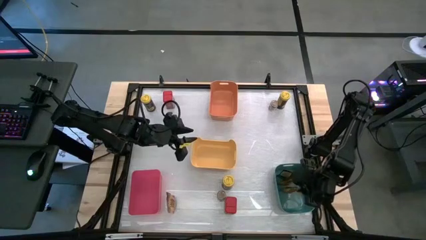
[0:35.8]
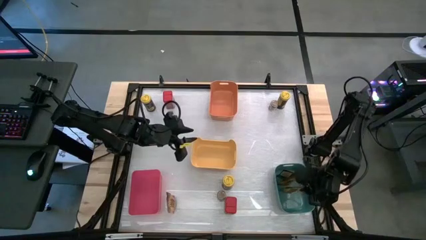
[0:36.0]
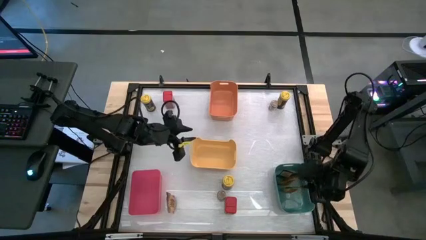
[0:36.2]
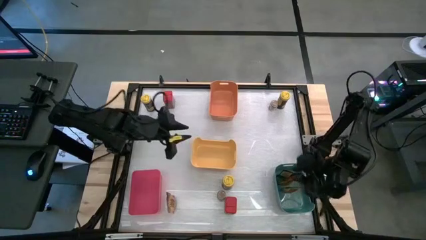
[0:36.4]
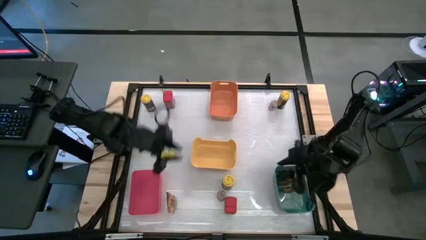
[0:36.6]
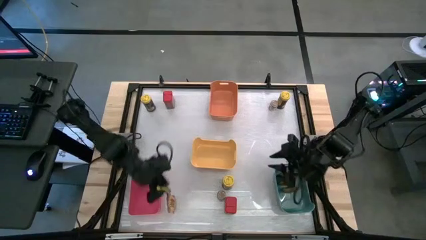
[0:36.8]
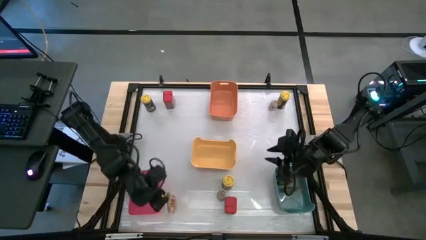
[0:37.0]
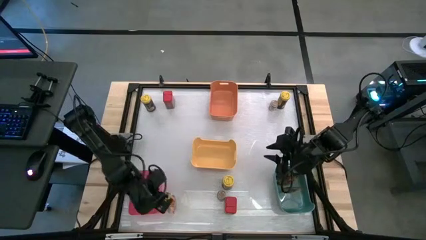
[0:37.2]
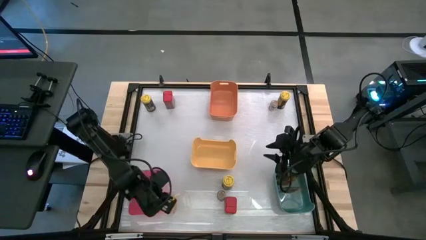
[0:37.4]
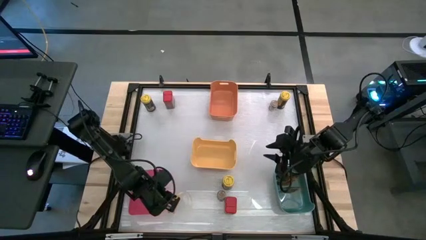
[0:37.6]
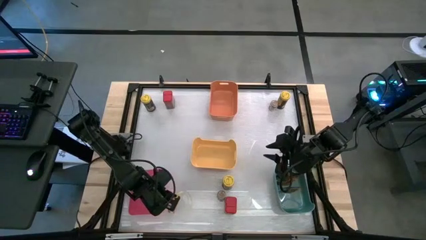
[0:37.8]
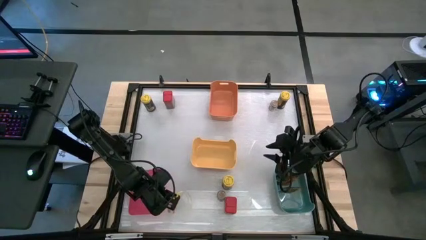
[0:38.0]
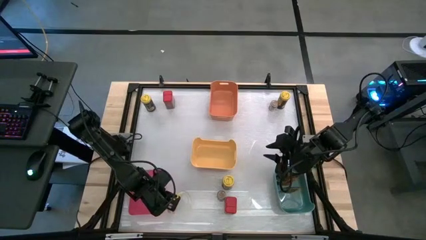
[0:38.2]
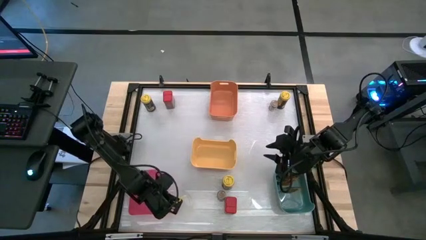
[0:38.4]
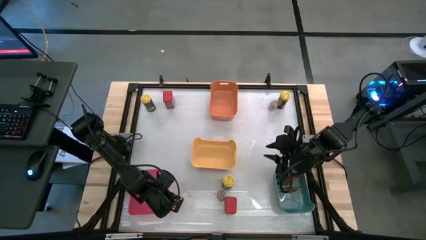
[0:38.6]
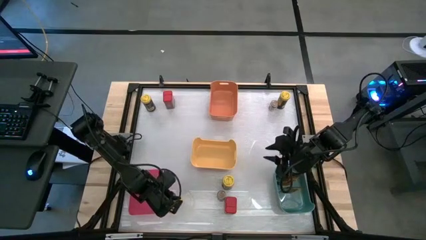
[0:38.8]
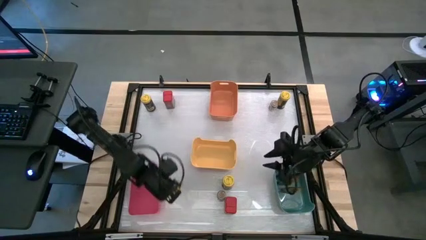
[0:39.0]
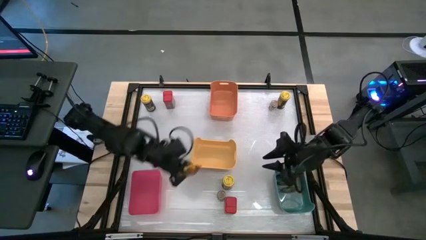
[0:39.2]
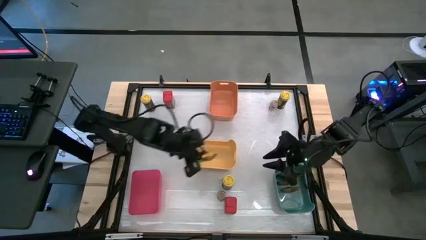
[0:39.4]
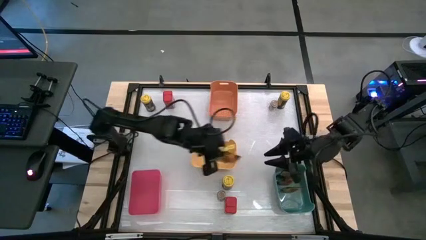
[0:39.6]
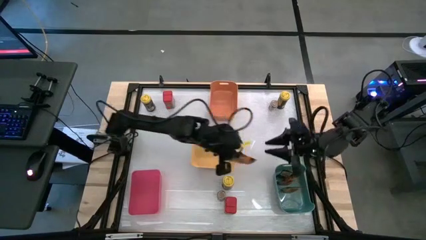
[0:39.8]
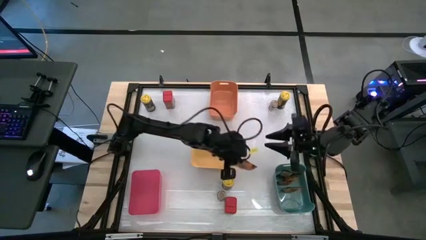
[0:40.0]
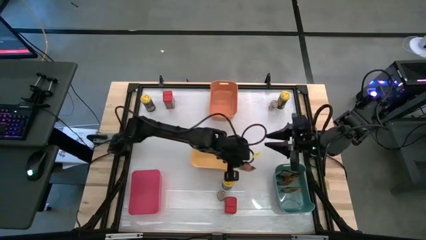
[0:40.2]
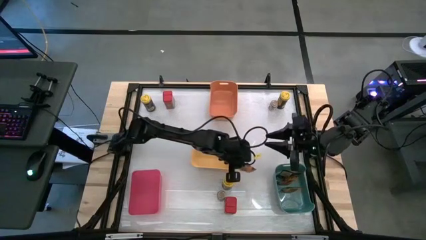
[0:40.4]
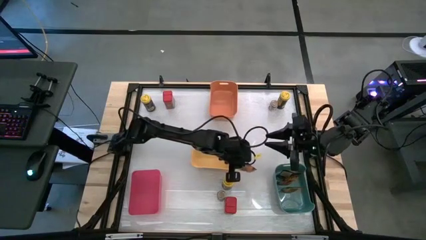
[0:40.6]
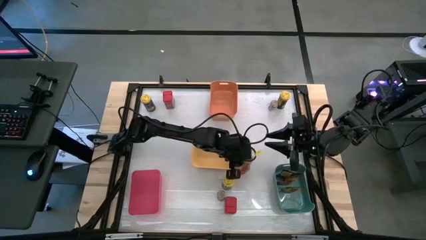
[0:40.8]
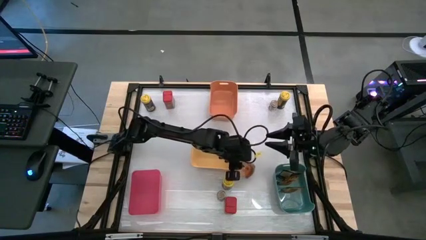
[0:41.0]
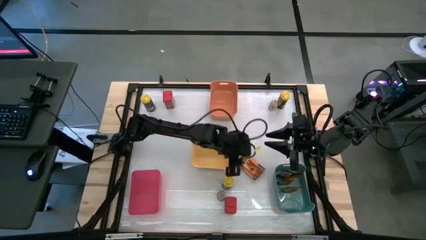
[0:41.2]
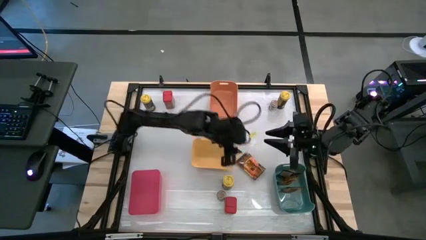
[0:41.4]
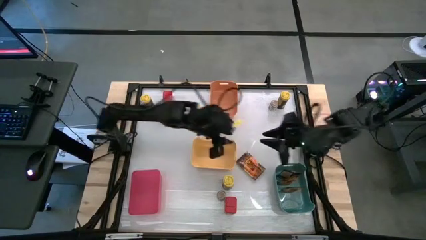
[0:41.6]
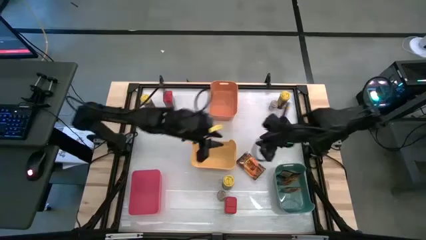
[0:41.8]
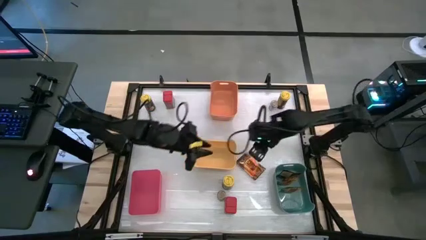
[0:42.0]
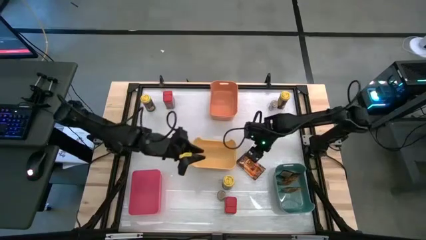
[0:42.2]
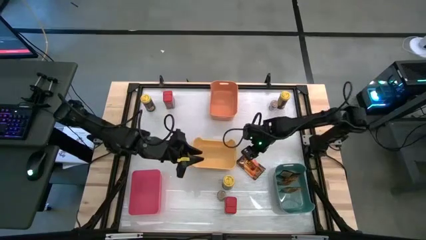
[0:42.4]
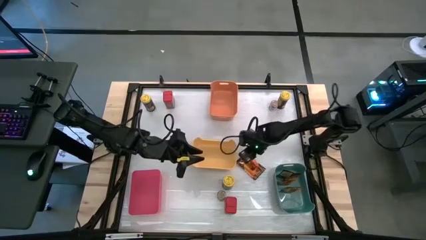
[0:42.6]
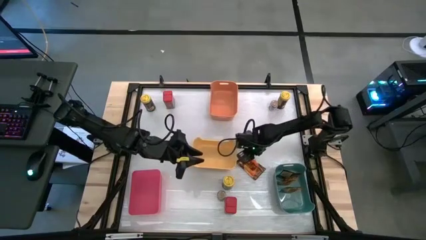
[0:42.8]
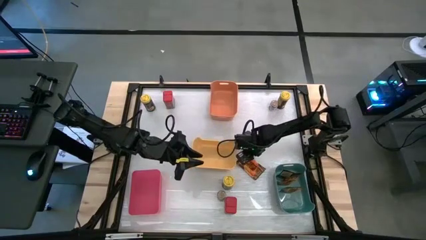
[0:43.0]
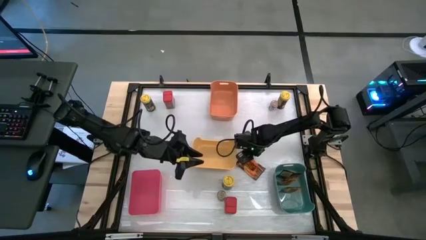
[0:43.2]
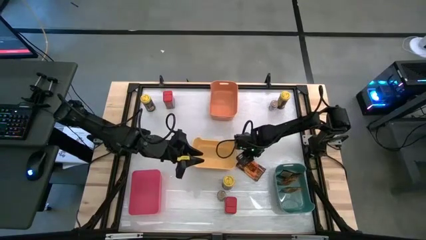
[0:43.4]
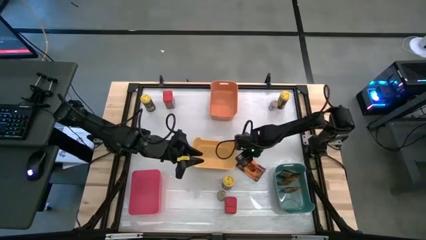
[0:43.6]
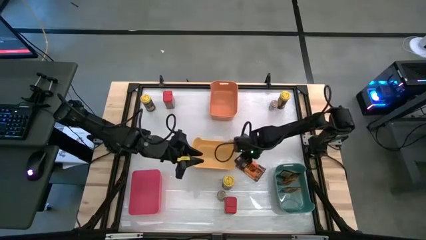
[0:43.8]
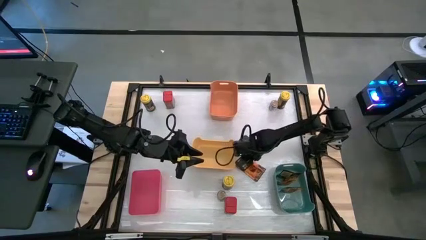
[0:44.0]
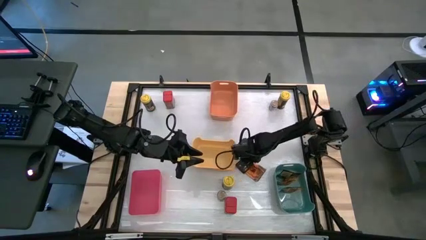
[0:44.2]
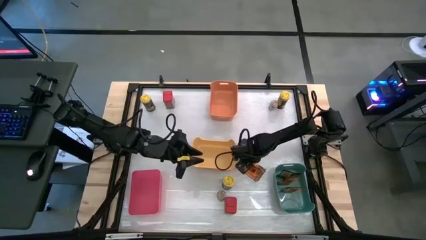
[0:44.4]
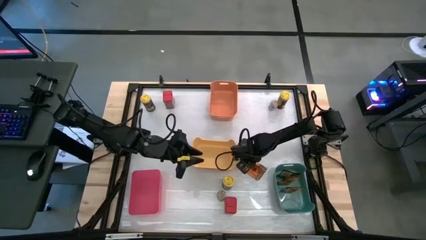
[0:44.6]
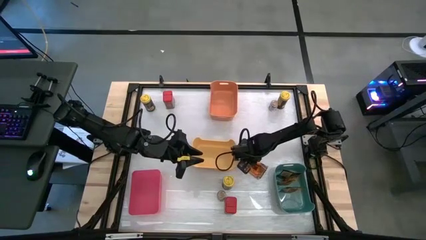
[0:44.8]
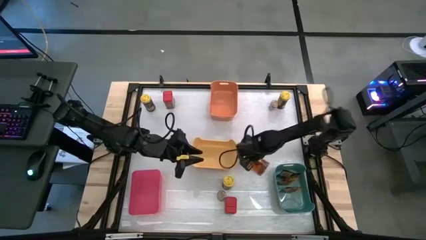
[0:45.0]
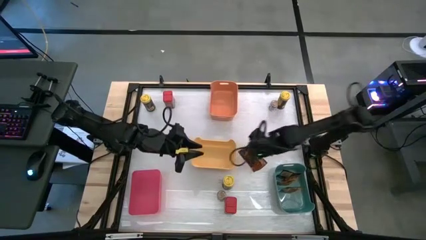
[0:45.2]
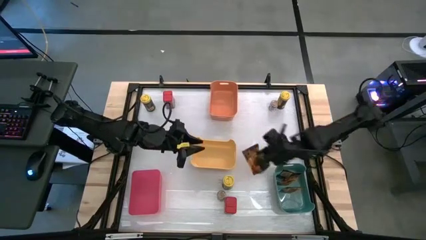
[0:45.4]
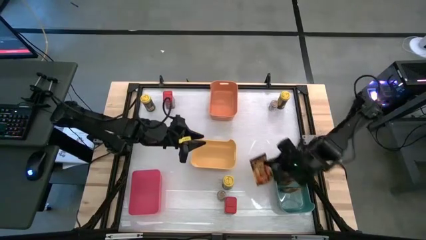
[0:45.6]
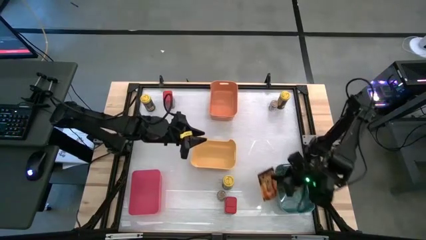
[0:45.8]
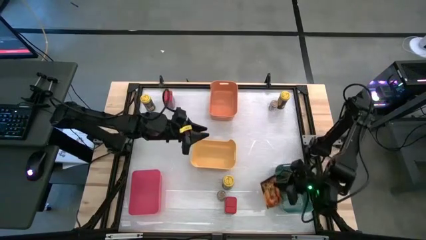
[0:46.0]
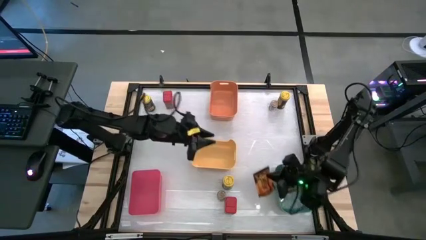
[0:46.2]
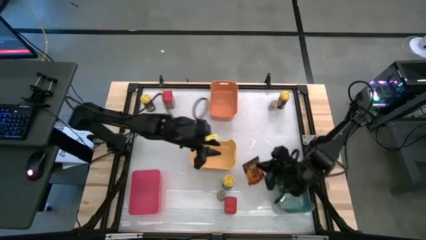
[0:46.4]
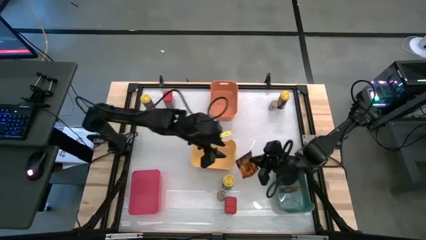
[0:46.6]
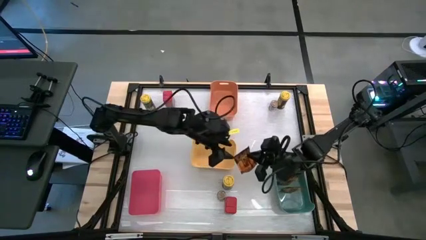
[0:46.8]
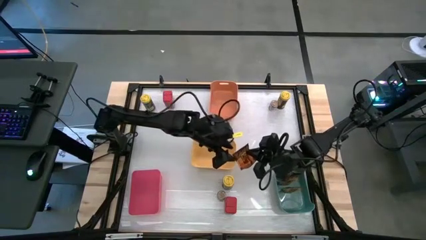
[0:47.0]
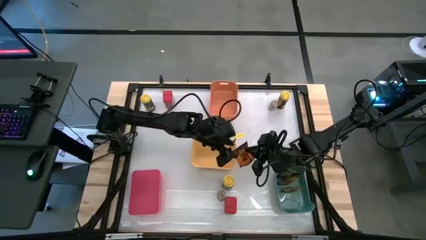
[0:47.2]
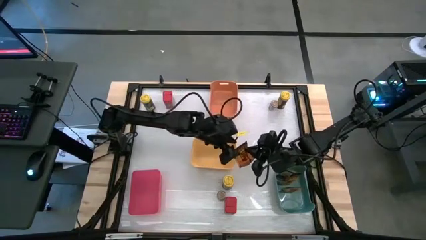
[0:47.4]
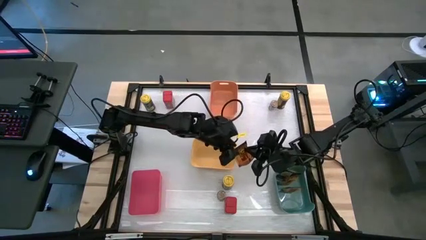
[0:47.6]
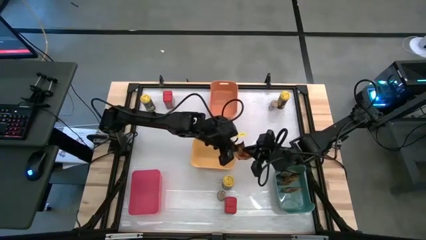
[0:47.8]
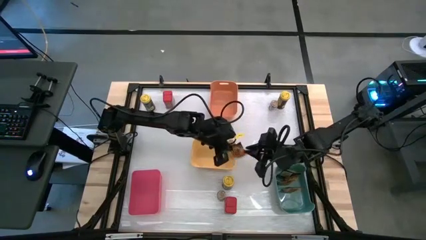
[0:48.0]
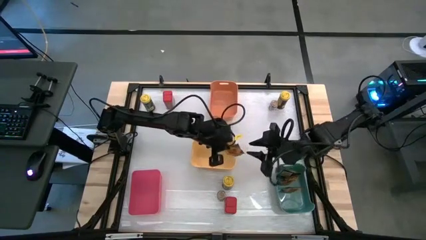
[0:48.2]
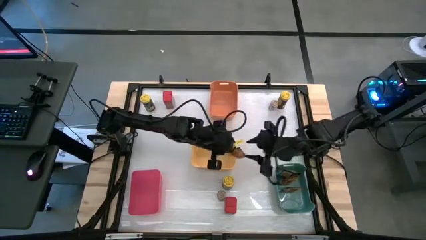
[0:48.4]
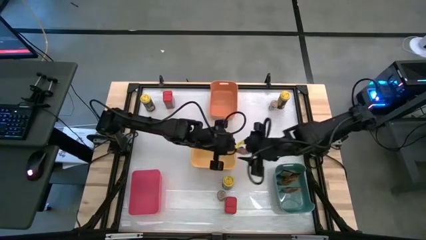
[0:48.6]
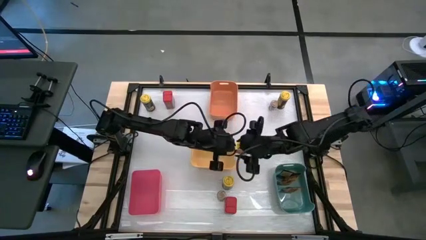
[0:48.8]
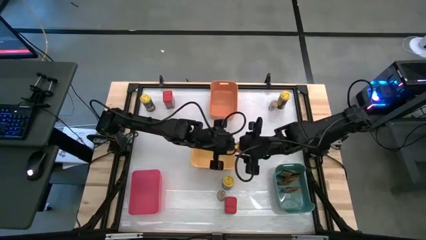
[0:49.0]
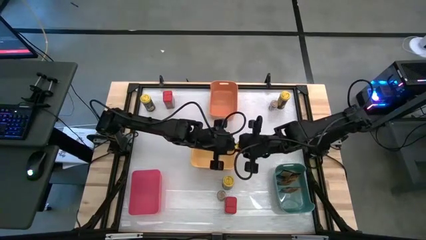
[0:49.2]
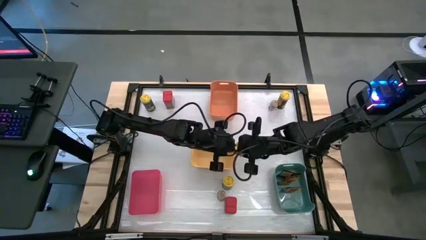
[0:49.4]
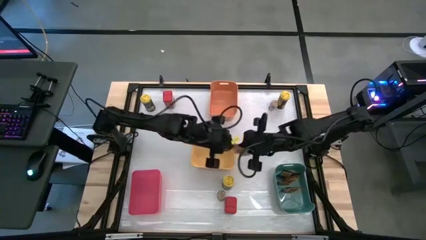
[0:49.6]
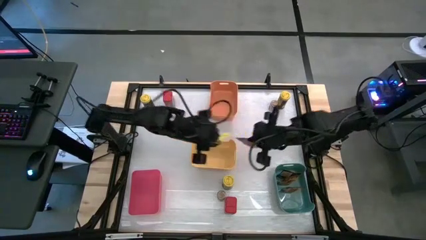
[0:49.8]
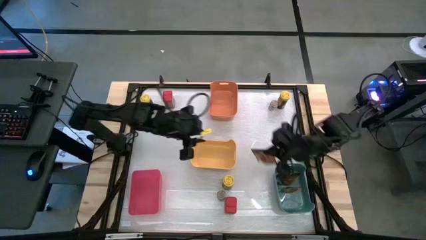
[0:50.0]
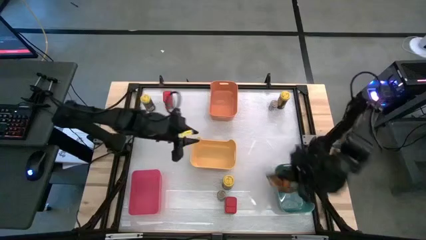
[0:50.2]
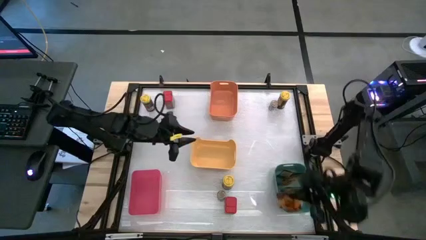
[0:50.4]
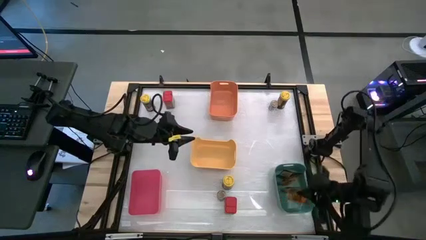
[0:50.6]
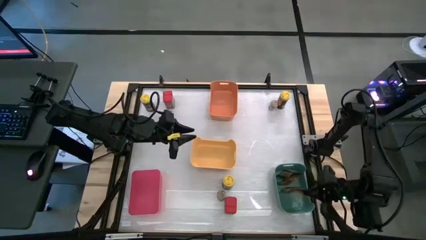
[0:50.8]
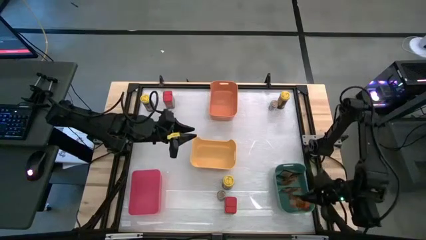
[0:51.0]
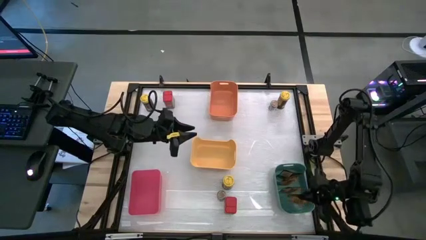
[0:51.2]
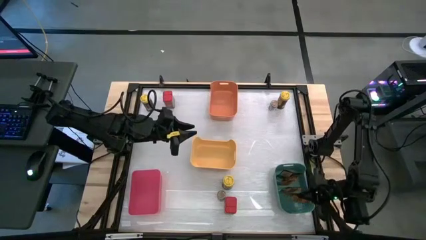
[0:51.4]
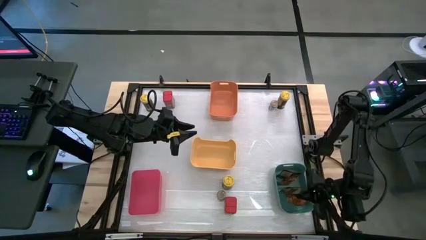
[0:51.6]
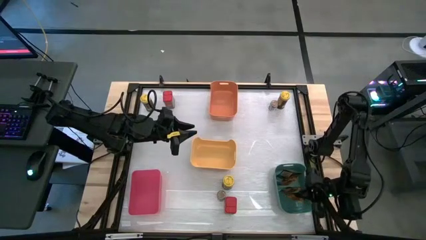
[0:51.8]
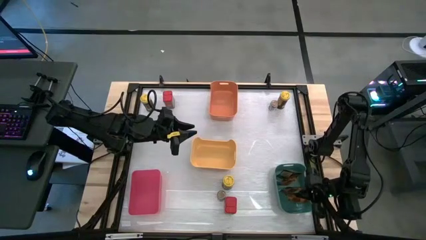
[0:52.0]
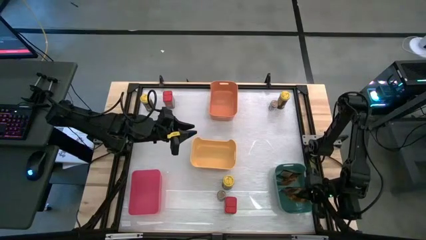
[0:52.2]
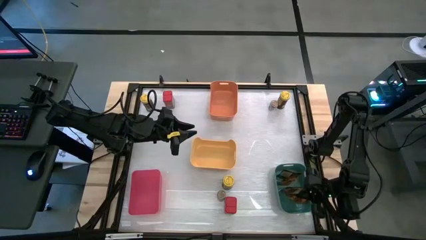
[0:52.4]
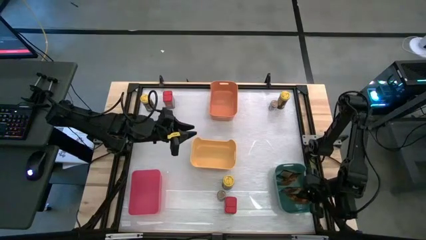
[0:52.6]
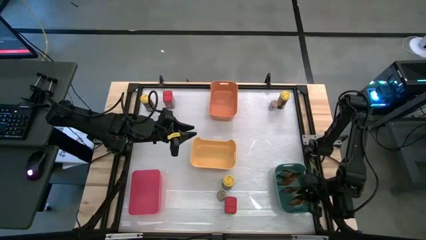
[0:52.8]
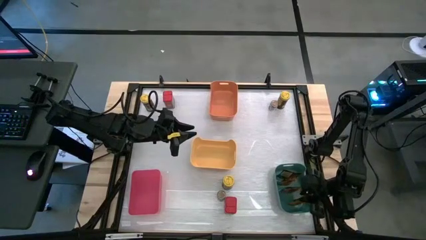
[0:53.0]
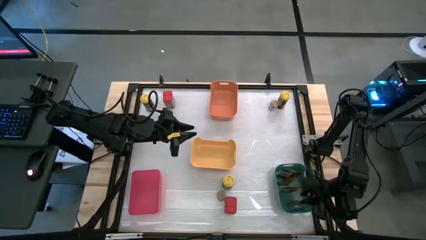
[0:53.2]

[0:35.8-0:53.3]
Task: Sort spices by type
Put the orange seasoning bag into the blue bin
